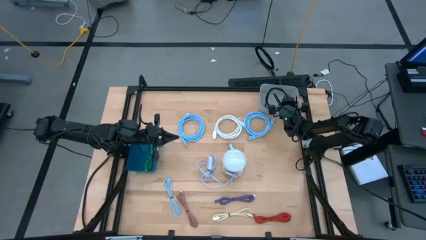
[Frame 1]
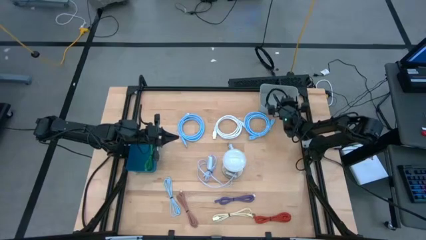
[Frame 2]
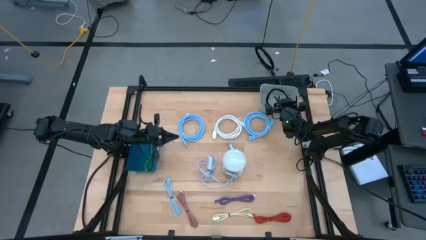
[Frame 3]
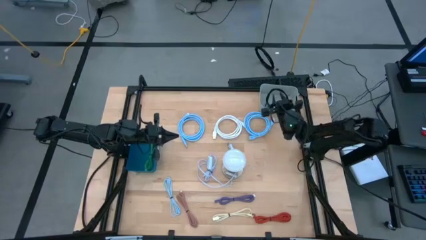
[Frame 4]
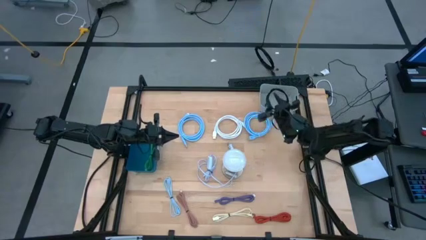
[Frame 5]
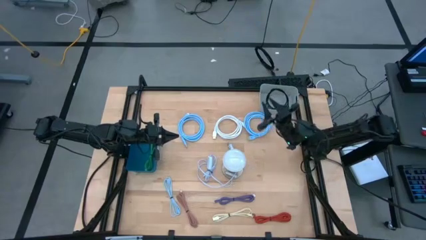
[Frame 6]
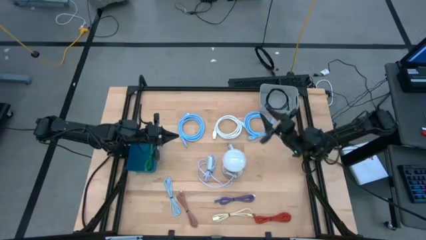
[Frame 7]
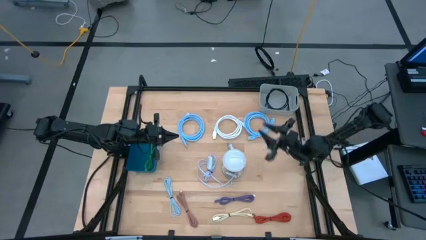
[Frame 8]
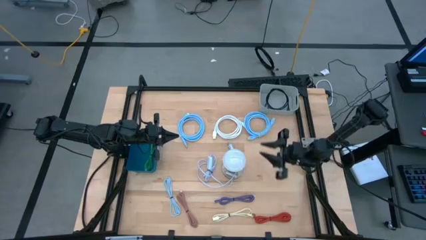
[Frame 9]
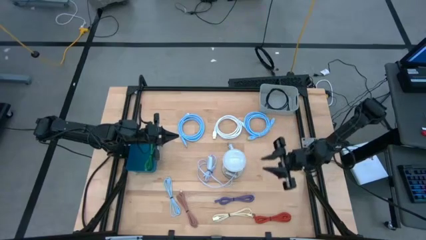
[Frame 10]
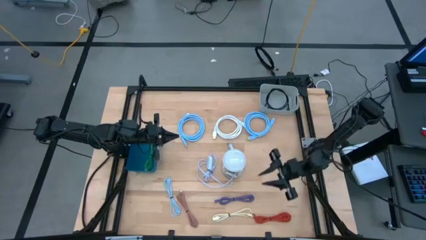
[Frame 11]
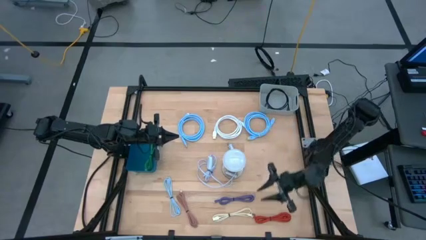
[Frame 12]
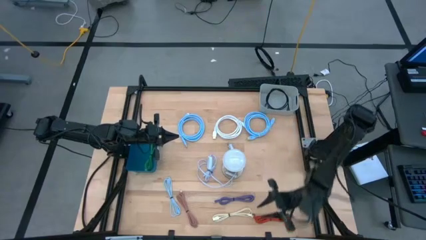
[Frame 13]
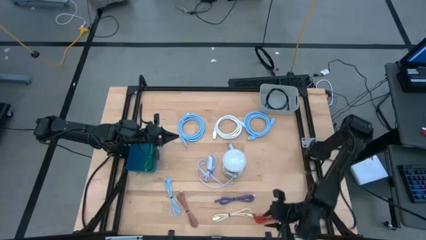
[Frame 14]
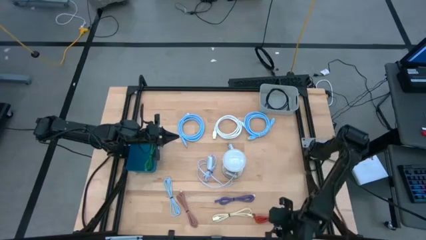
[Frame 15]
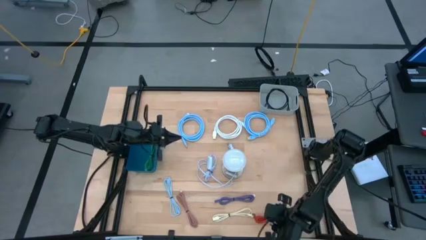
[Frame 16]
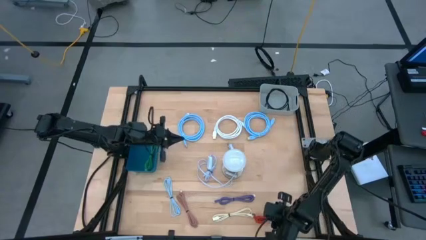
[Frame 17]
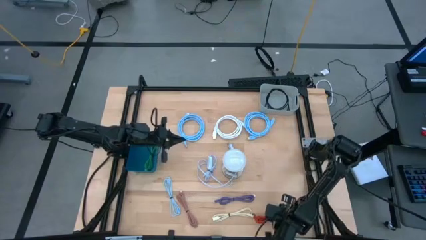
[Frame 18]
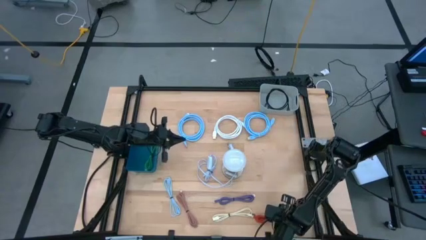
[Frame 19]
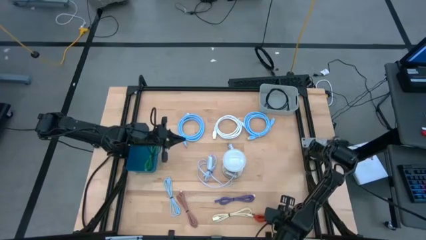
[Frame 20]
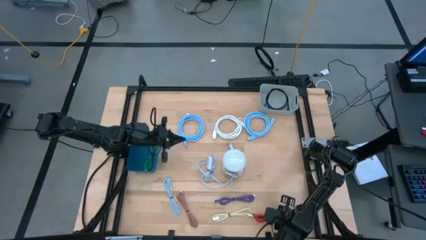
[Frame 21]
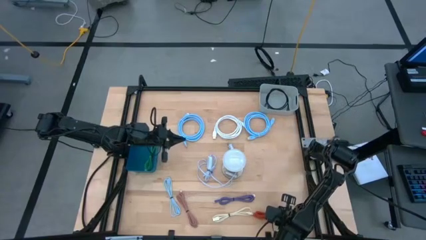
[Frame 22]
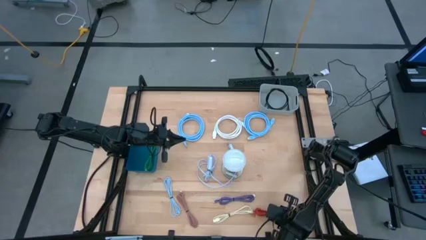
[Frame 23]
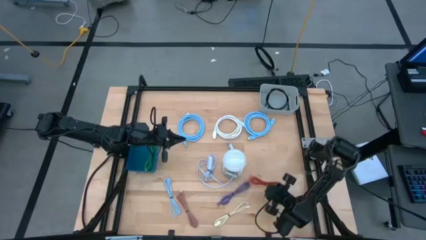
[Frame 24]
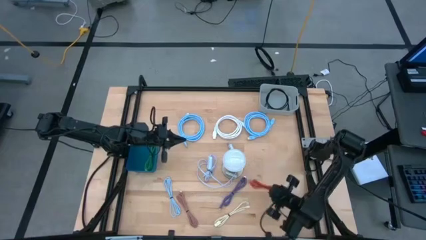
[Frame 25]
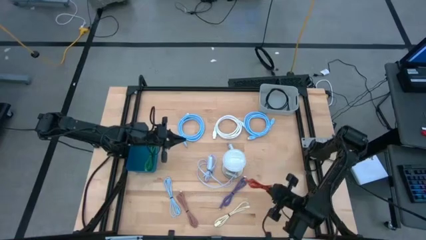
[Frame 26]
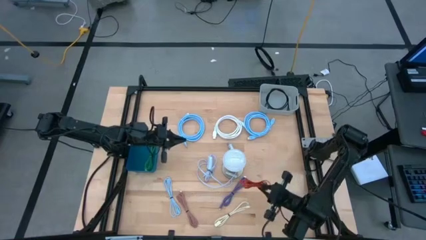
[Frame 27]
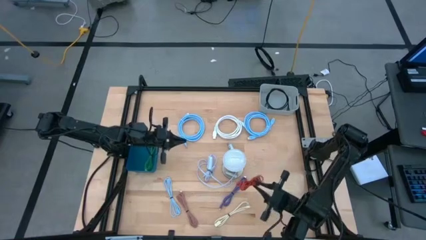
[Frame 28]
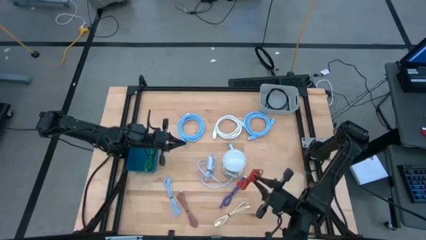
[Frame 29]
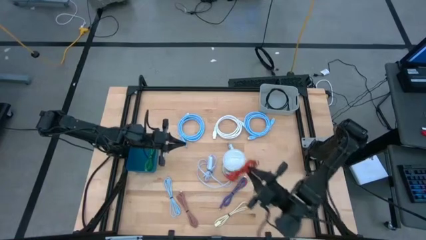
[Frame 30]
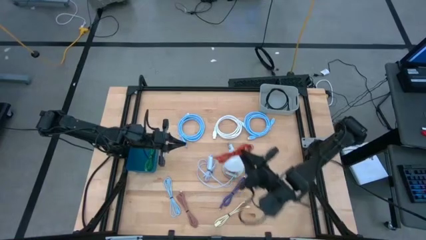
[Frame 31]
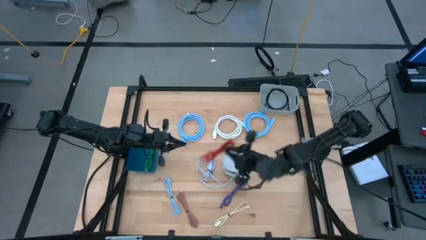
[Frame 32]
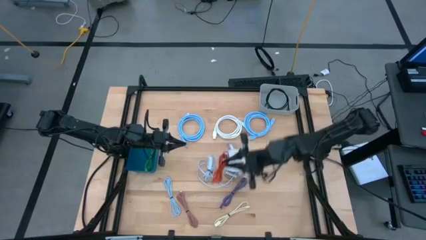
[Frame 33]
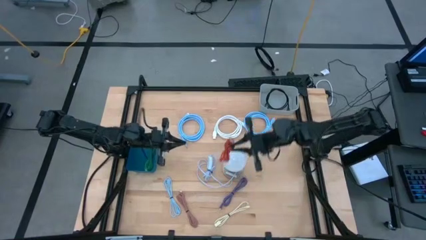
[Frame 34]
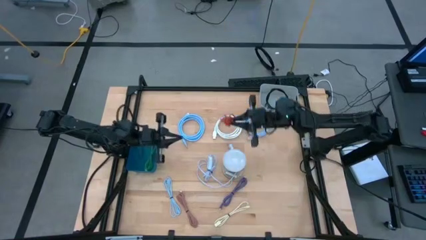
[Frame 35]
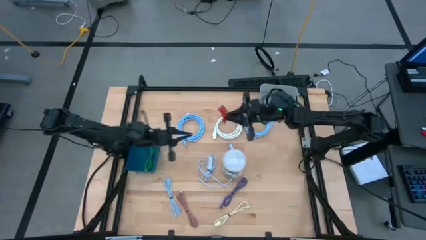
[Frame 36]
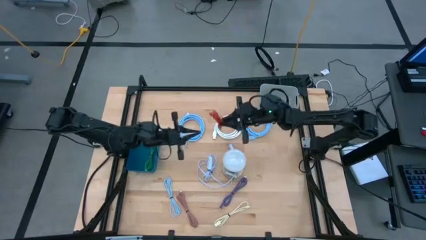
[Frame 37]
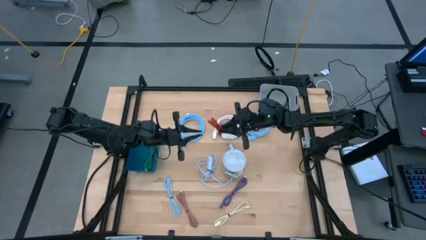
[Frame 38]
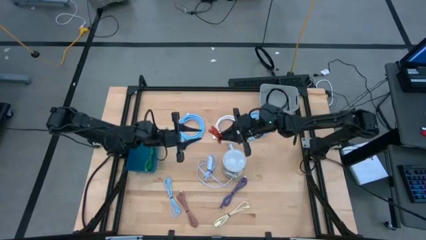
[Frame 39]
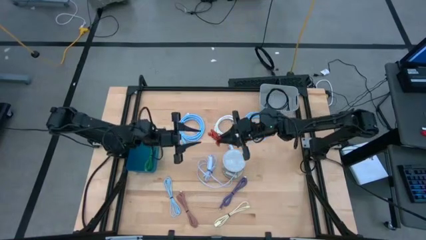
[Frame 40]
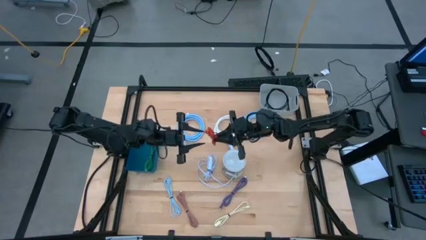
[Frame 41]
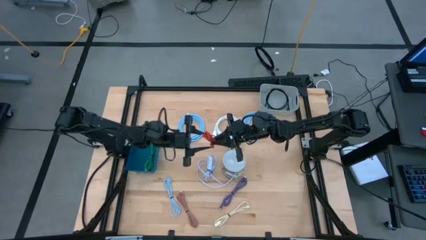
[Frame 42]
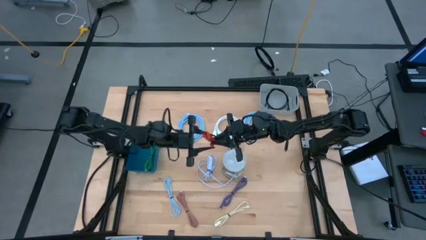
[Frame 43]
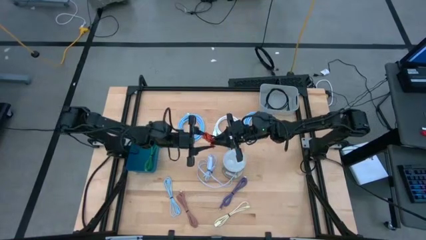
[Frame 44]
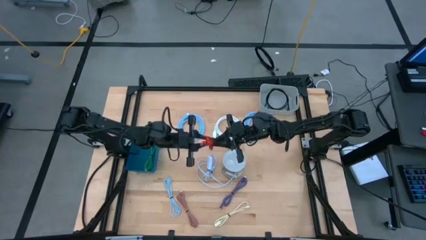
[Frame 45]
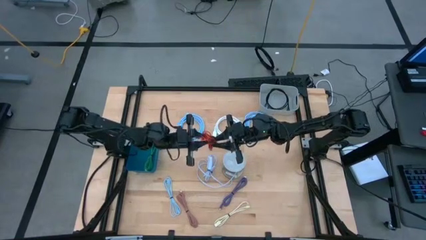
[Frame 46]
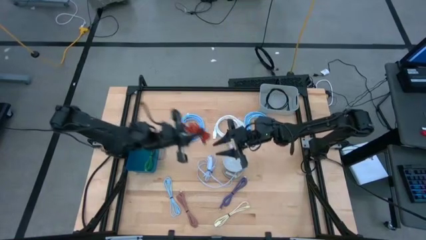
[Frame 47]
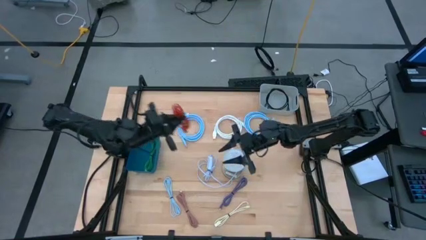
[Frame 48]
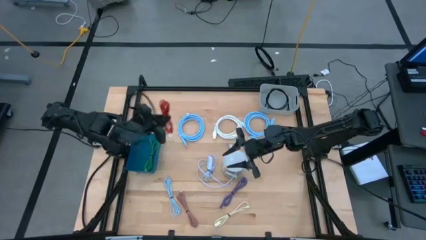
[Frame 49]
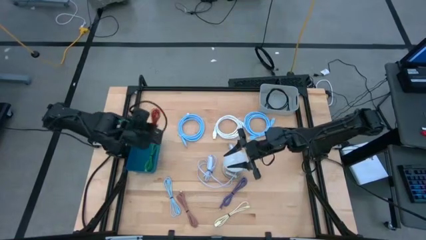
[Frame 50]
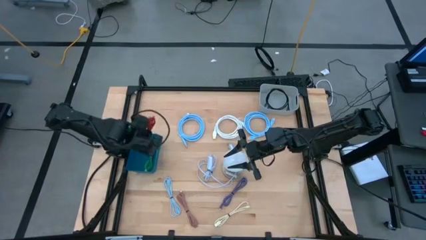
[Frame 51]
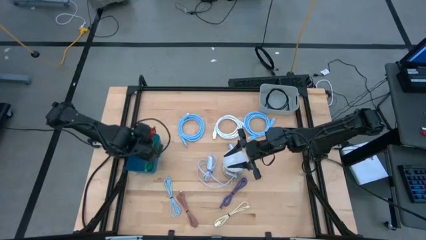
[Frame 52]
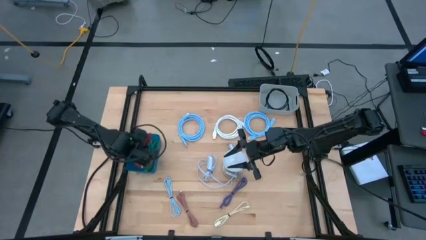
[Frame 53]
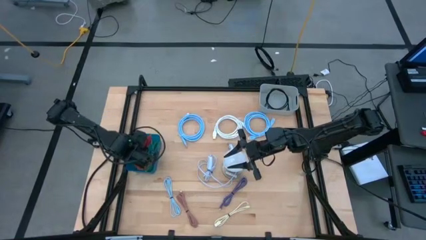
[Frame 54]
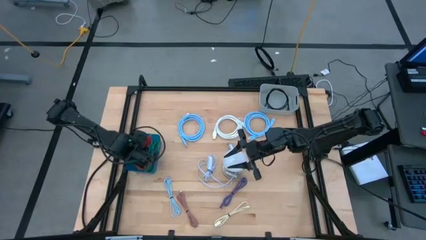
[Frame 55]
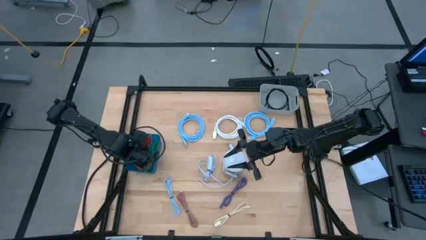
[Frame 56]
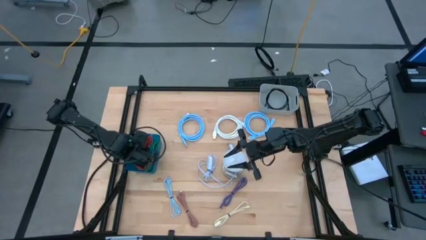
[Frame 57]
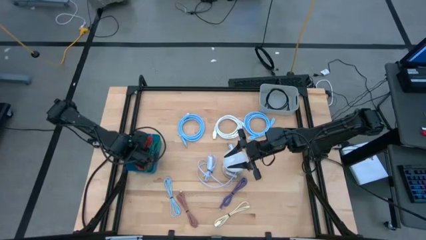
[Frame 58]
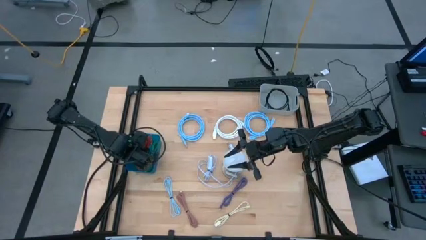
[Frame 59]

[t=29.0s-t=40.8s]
Task: Pick & Place USB Port
Put the red charger cable into the blue bin

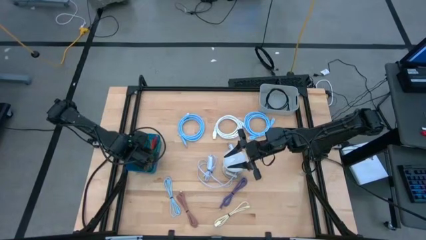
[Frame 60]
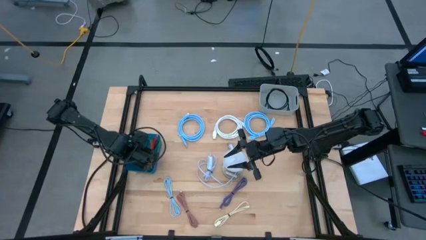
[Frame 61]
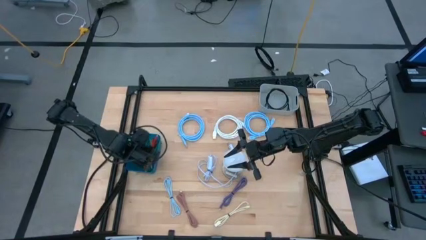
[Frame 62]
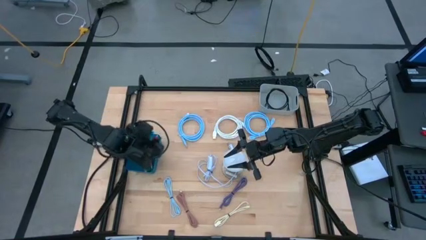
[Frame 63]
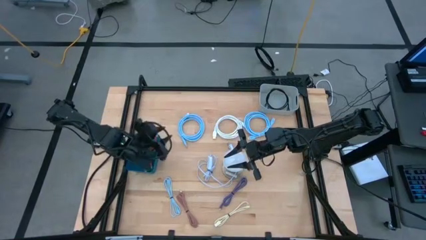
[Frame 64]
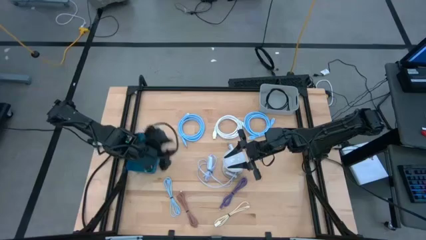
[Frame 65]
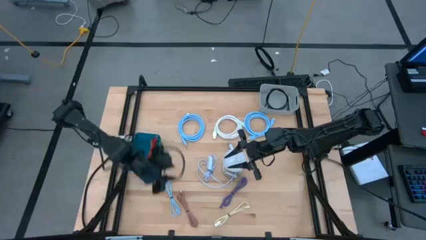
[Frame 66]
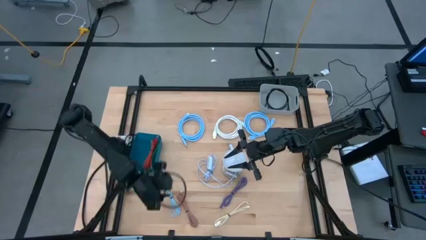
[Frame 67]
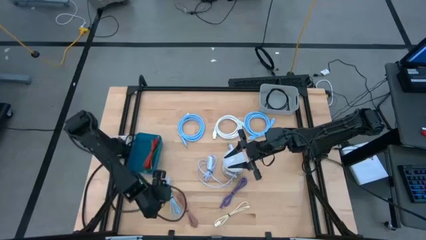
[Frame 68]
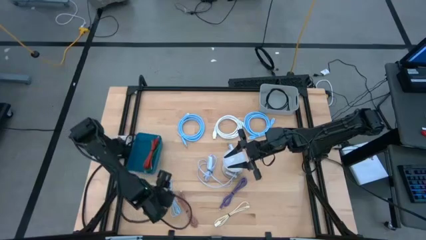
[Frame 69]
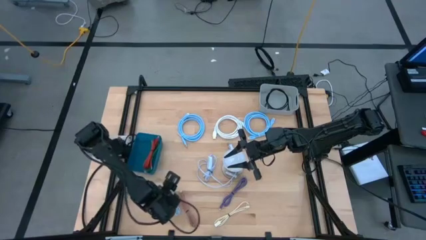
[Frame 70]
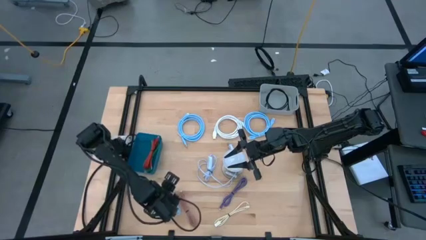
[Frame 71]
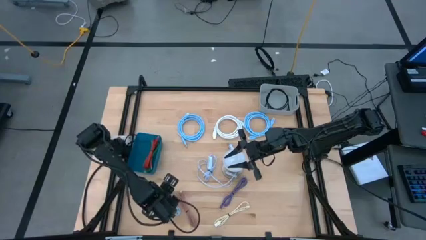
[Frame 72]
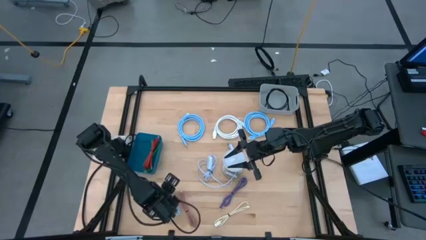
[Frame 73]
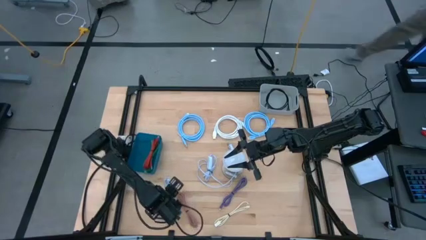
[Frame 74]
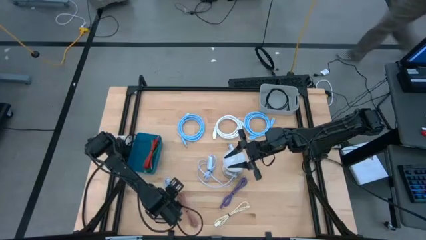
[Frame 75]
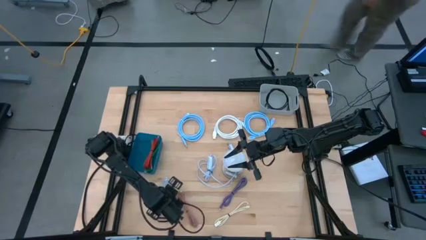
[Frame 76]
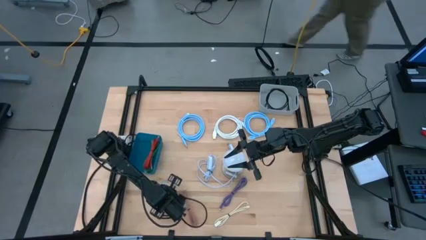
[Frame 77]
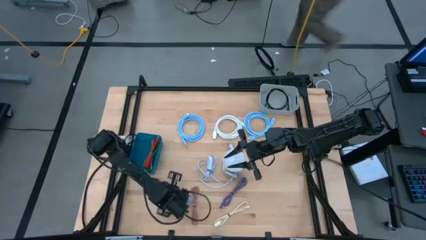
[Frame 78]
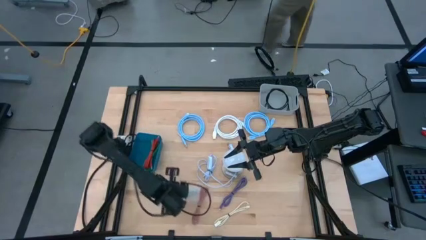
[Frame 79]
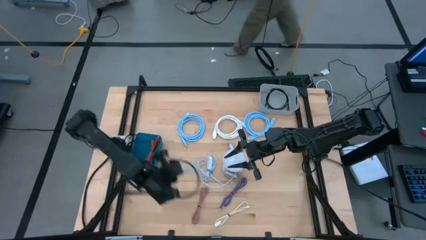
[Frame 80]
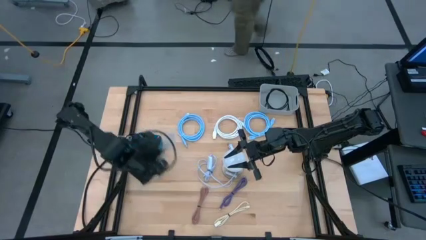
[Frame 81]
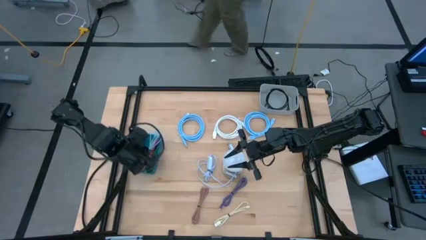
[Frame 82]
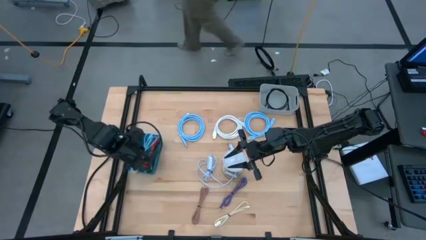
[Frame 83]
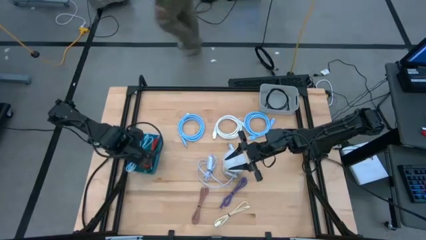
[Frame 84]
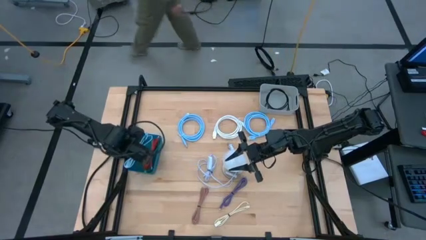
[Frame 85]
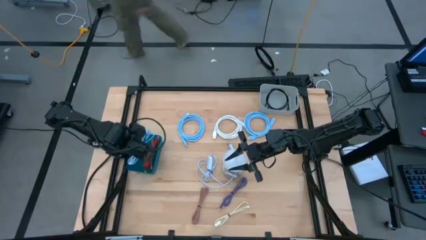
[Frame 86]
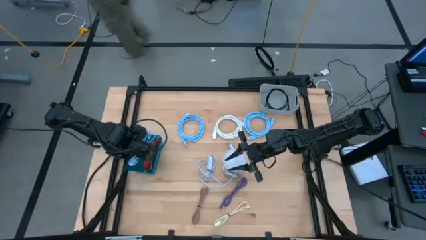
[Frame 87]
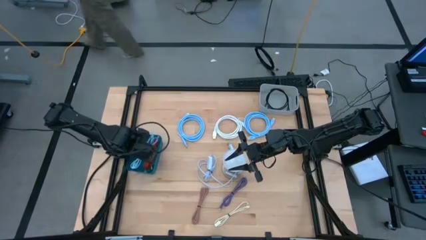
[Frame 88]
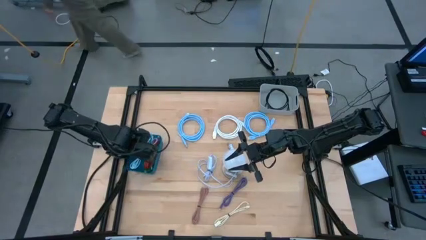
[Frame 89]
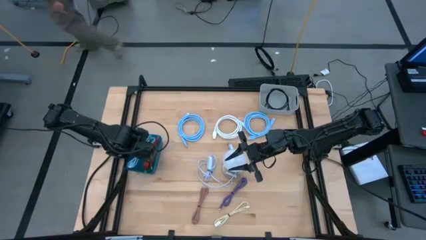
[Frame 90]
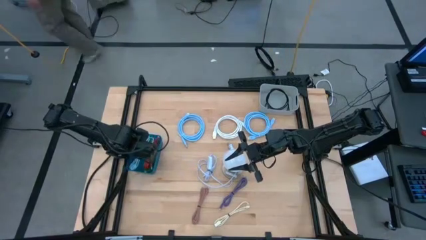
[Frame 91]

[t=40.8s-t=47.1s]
Put the blue charger cable into the blue bin
